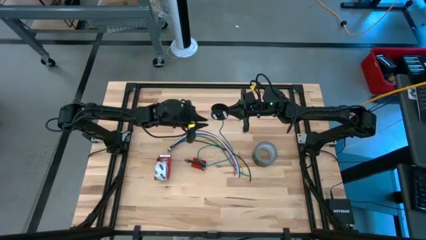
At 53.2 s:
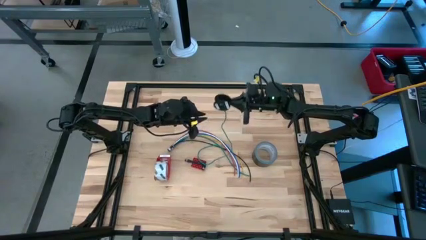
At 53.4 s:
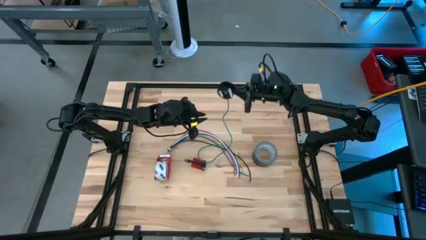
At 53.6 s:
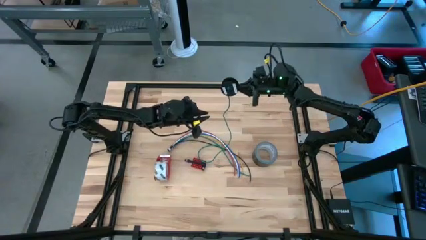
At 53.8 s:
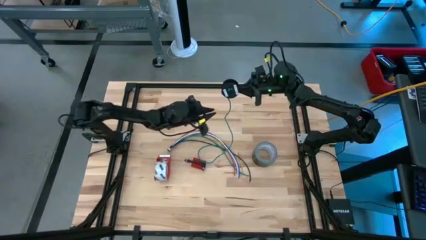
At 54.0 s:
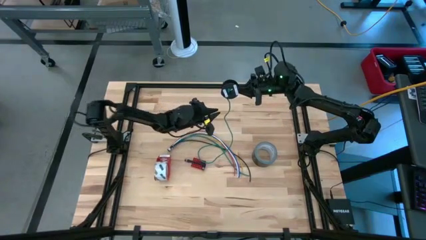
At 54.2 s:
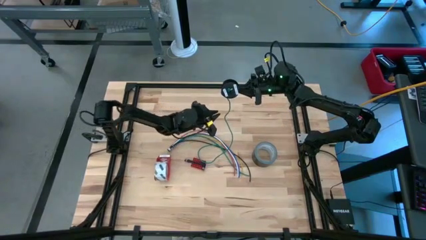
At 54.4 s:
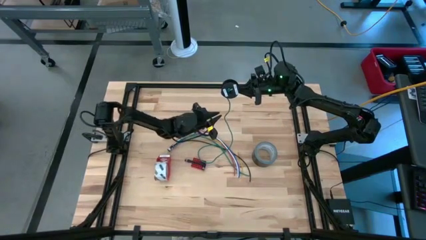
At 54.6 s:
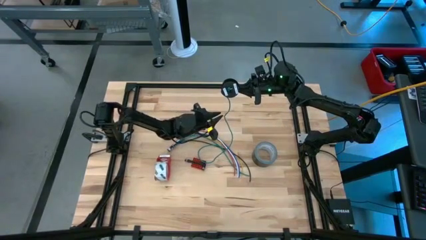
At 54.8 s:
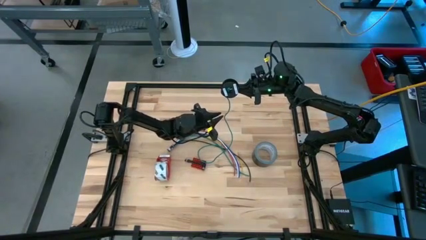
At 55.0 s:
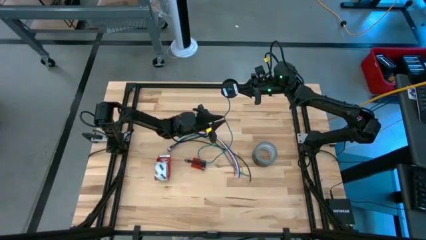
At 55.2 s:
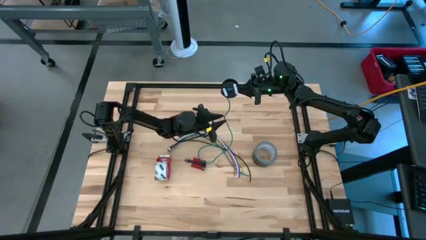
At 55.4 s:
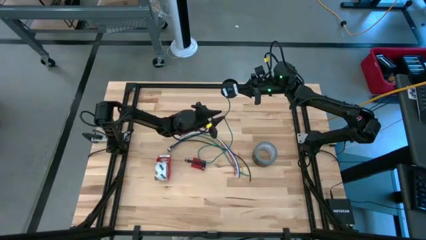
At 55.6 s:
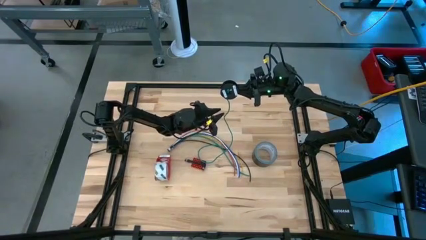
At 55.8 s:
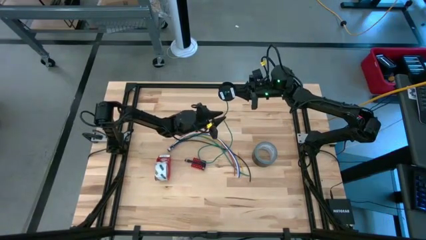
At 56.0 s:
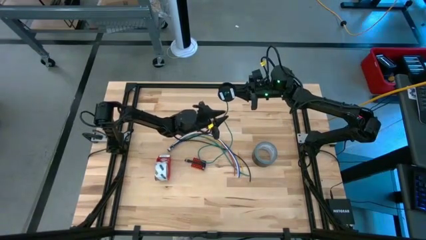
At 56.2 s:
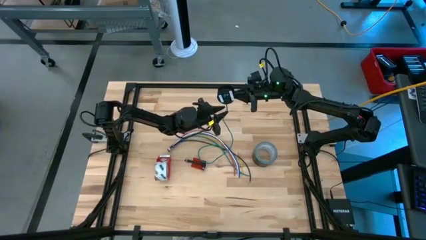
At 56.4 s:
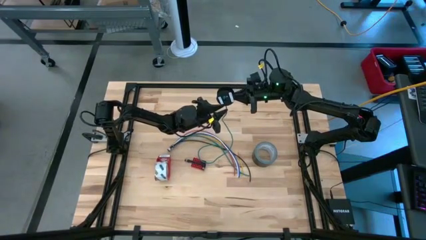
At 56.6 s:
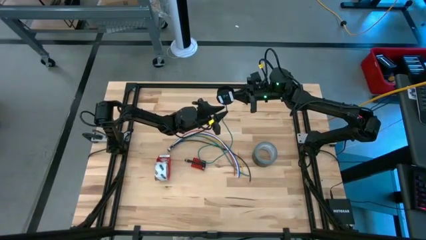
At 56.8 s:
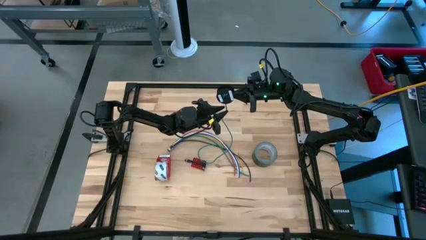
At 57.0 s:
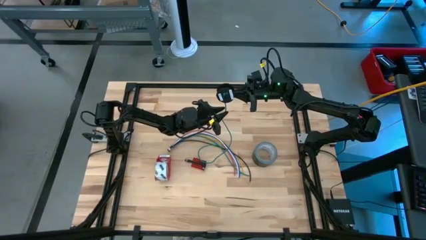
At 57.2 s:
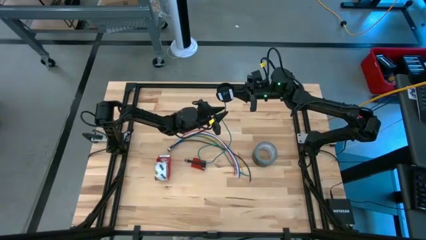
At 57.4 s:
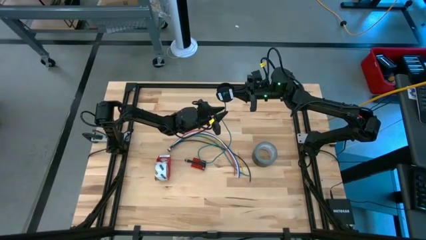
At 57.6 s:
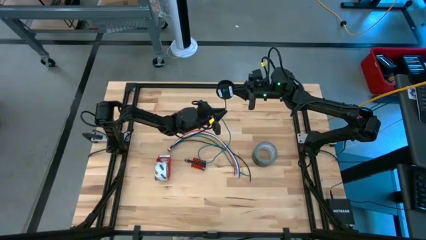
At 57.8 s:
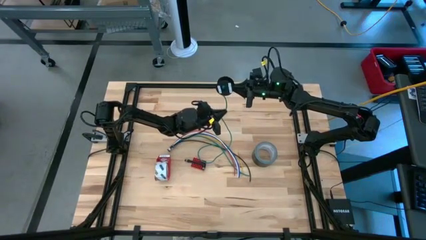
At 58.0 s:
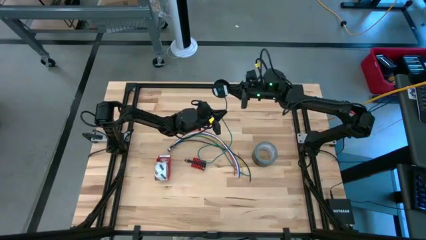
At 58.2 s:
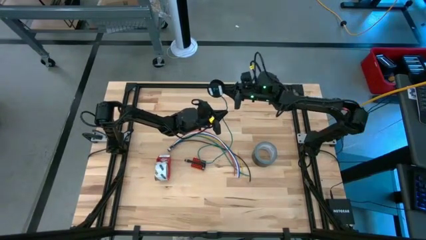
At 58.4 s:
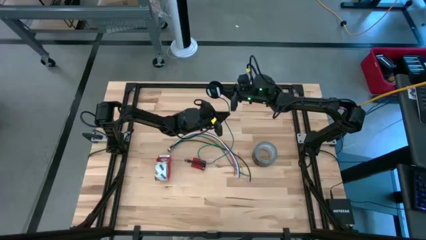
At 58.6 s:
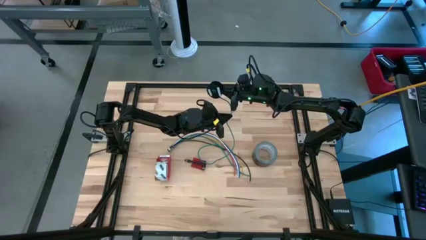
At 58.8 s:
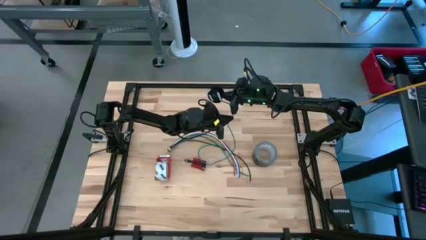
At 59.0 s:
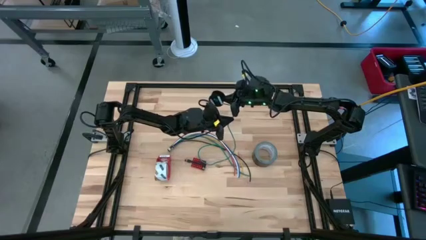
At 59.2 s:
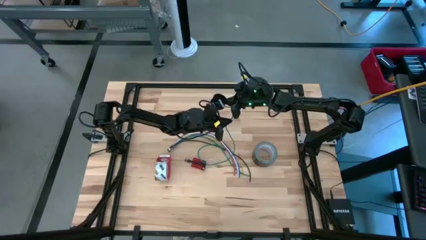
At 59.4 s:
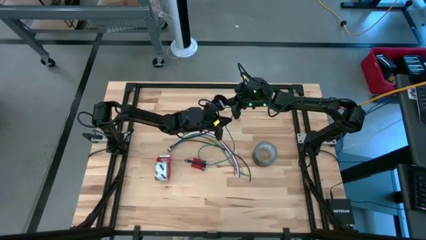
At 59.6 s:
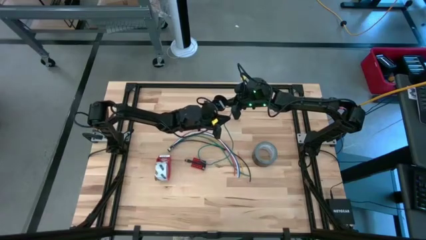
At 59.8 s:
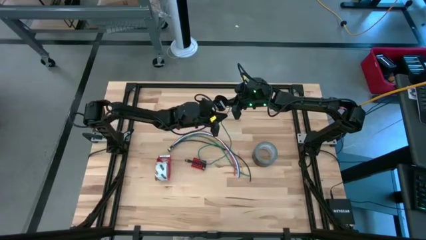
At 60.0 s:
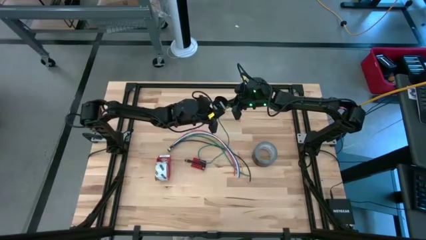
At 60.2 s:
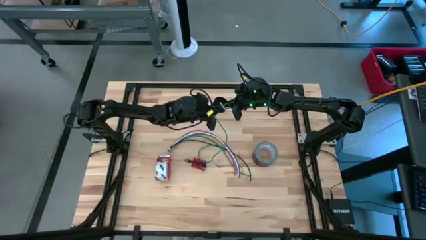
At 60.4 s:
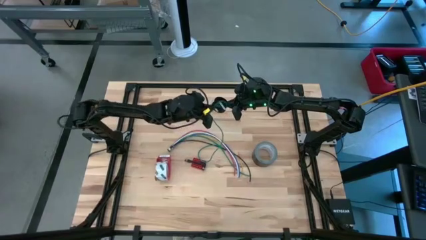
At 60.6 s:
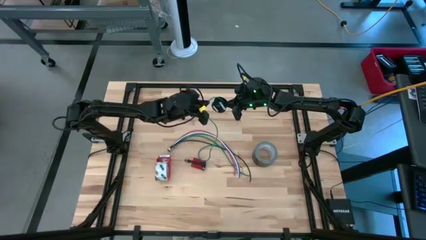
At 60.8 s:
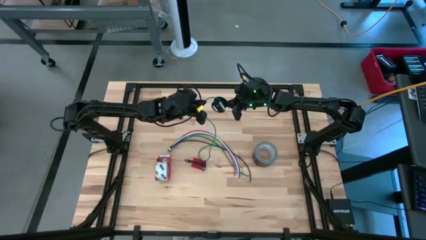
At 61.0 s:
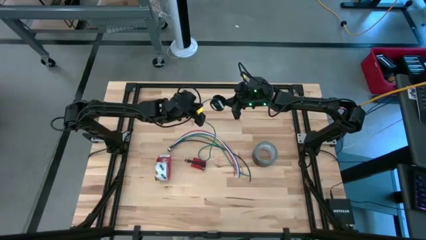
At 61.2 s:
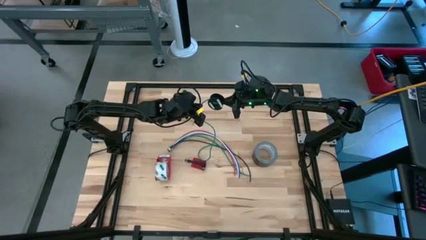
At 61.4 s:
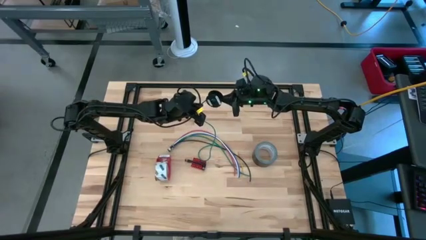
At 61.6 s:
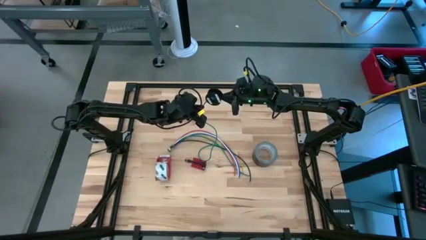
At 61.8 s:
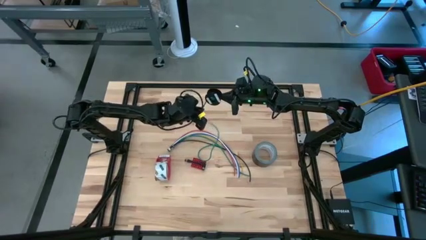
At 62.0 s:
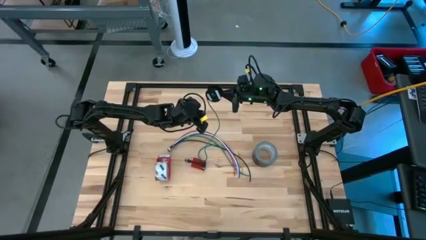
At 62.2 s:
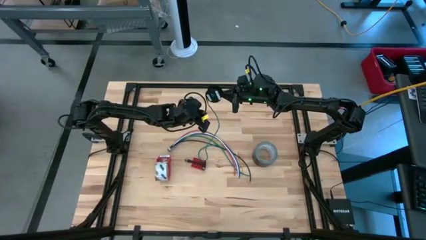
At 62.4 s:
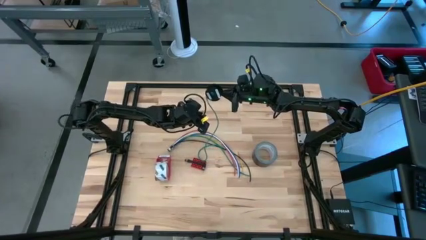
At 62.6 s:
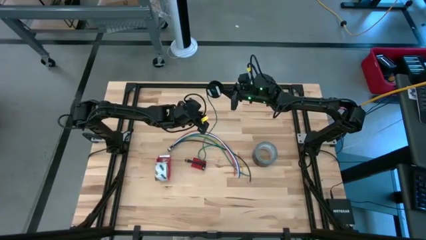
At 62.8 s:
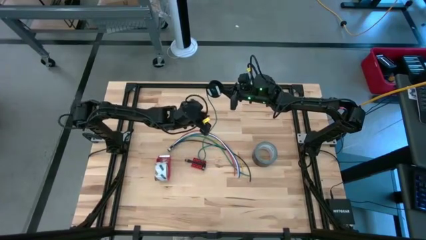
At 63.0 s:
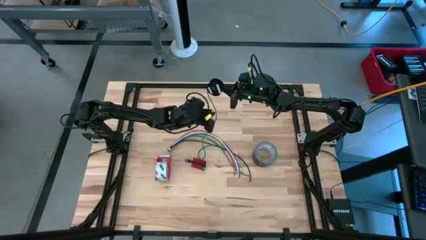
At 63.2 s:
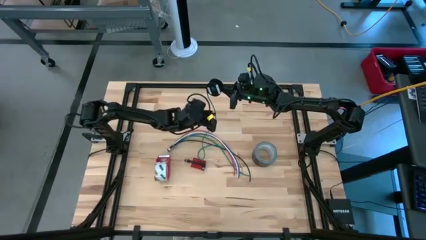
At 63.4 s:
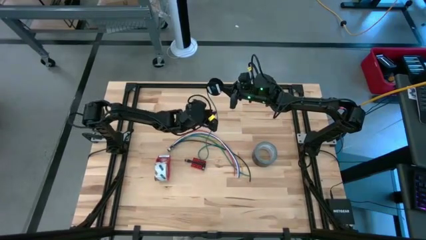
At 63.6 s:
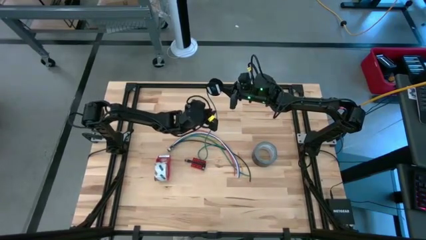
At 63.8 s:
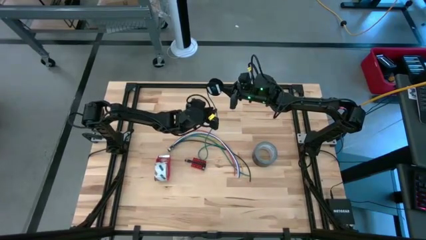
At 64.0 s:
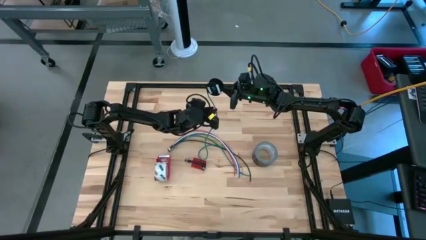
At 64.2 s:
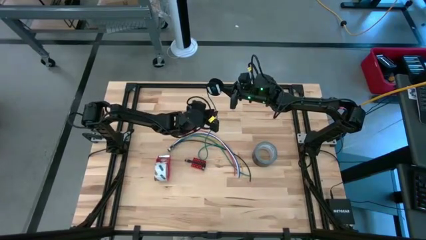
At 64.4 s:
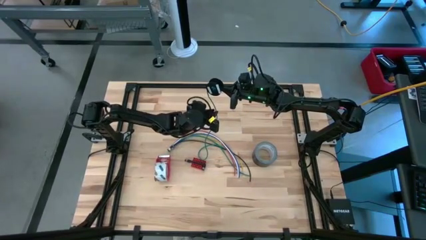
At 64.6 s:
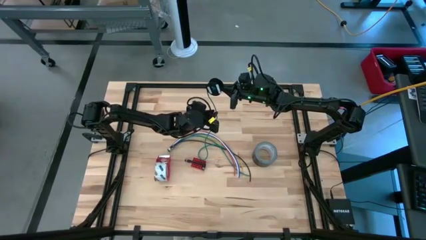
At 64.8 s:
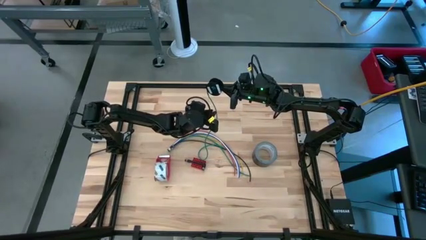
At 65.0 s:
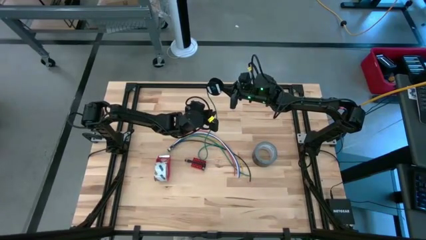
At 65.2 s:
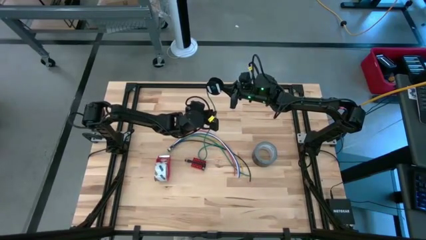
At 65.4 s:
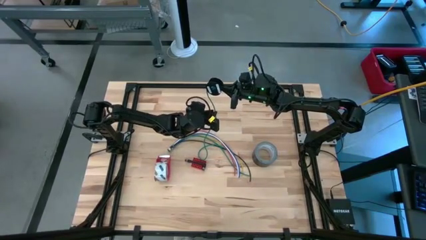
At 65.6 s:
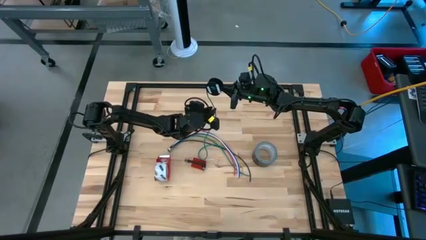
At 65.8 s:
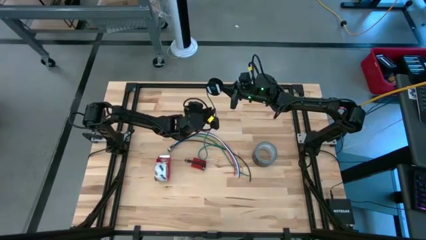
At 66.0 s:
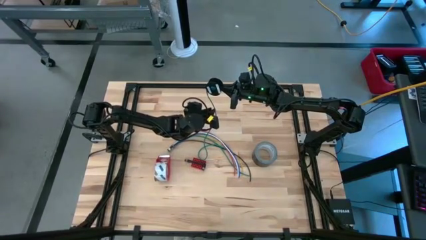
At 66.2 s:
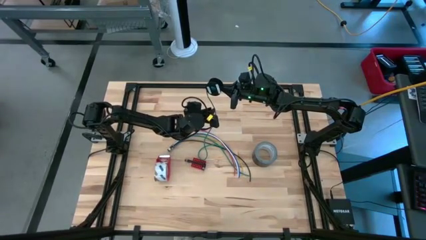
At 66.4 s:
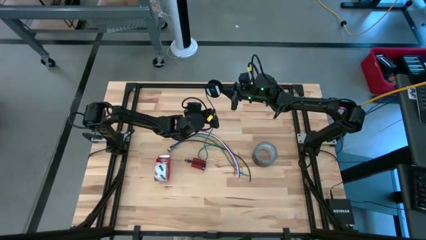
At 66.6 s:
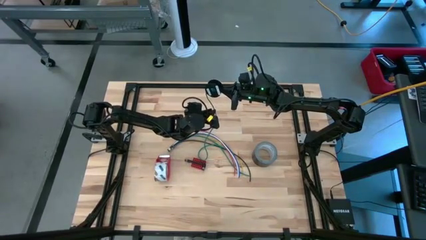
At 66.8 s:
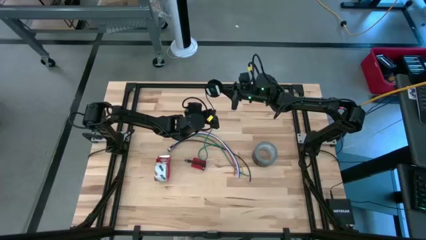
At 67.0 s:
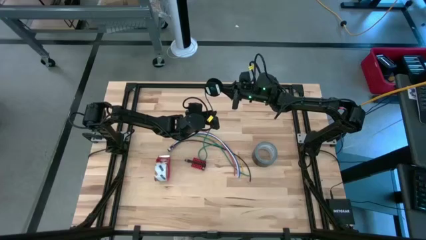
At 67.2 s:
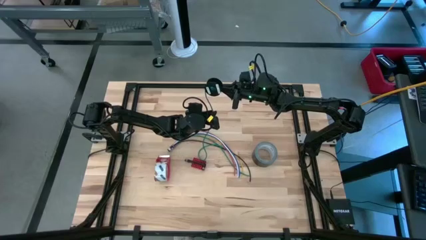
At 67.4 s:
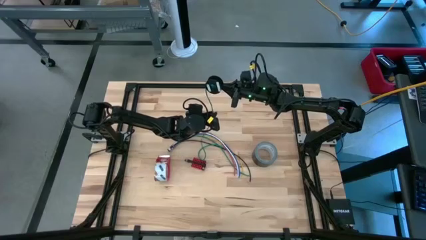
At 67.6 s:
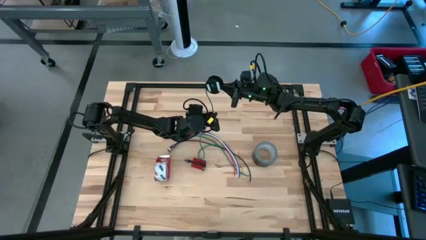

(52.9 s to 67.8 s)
Task: Coil cords
Coil the green wire onto the black spool
